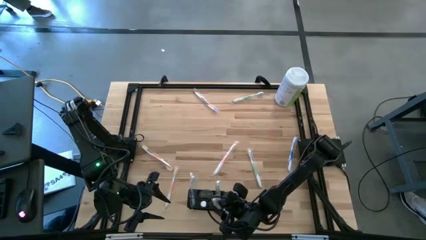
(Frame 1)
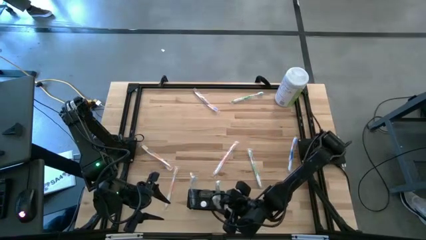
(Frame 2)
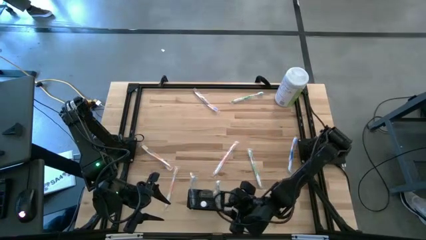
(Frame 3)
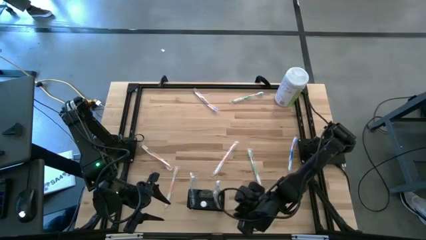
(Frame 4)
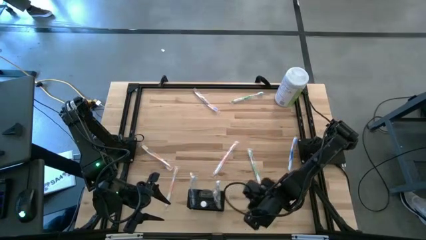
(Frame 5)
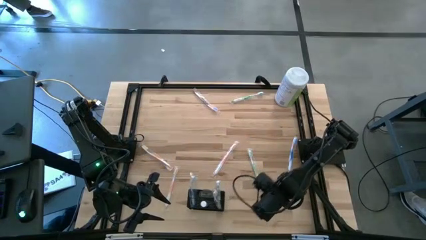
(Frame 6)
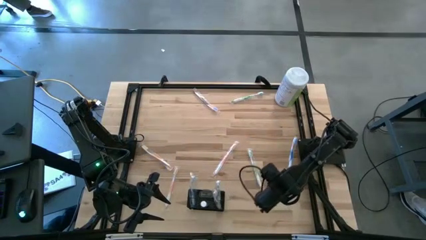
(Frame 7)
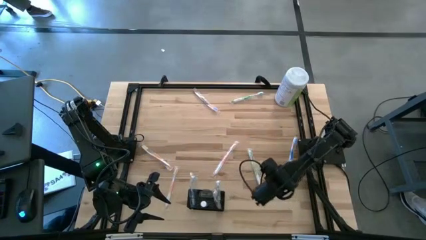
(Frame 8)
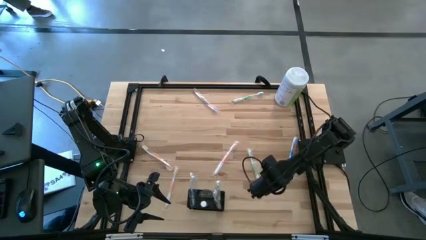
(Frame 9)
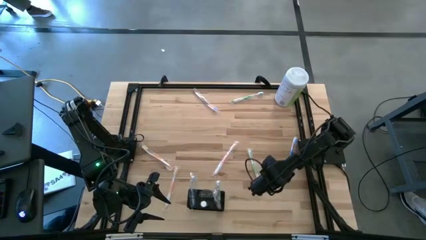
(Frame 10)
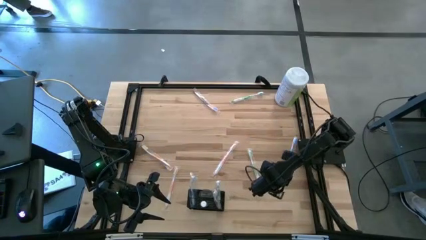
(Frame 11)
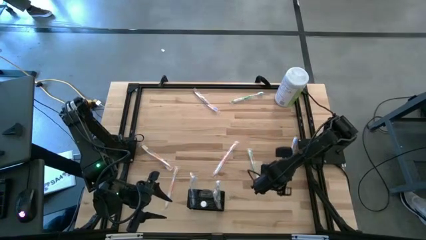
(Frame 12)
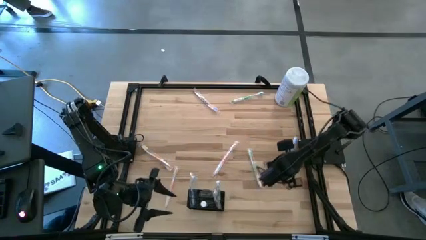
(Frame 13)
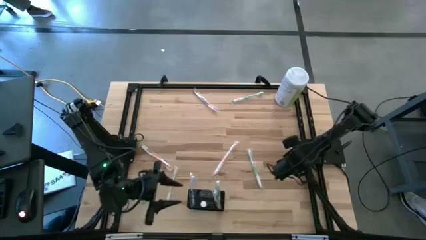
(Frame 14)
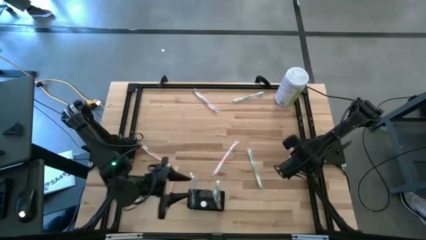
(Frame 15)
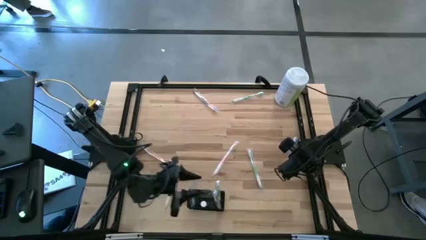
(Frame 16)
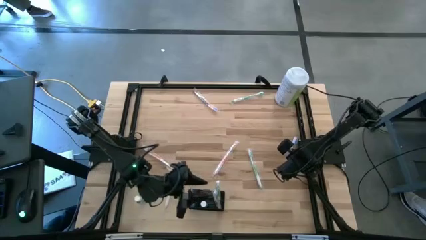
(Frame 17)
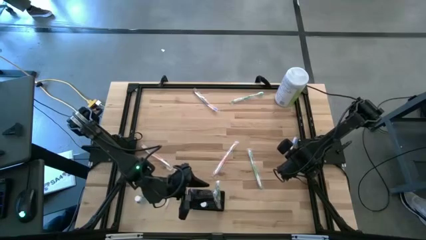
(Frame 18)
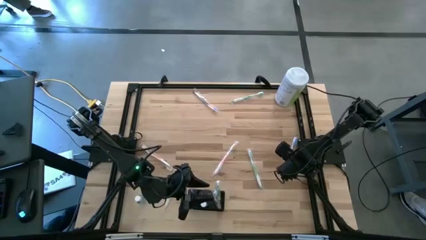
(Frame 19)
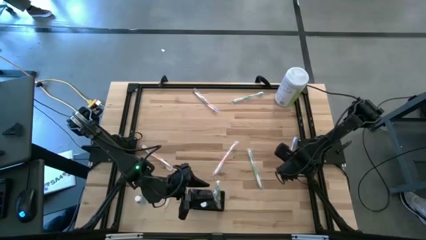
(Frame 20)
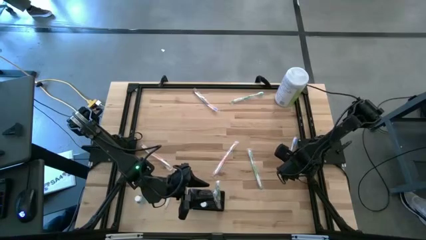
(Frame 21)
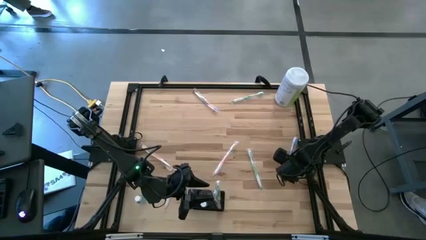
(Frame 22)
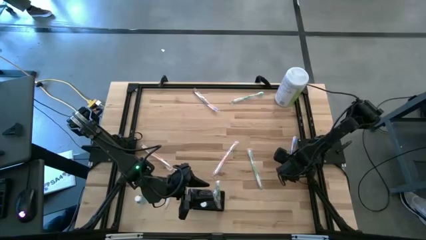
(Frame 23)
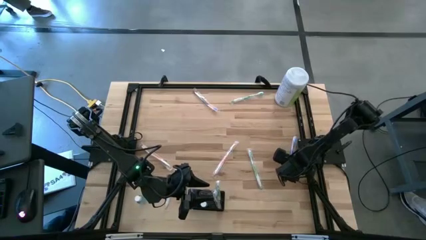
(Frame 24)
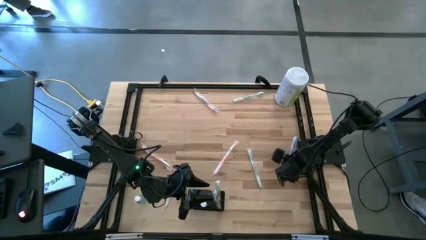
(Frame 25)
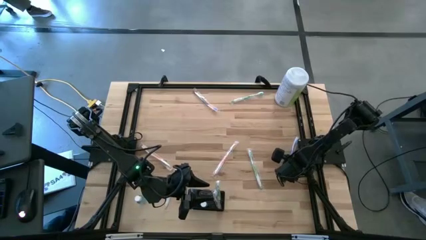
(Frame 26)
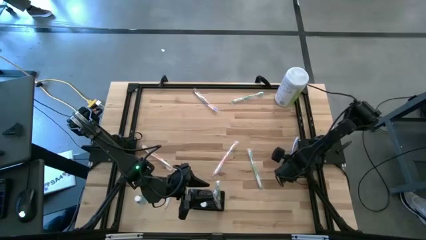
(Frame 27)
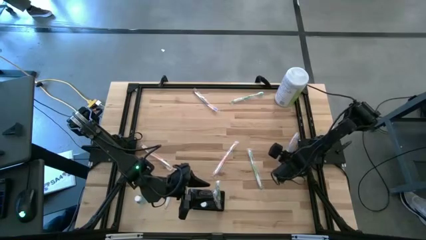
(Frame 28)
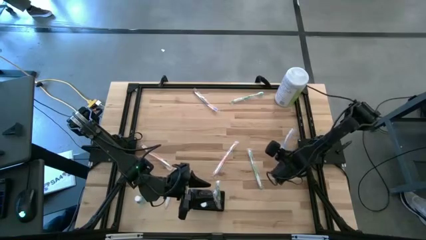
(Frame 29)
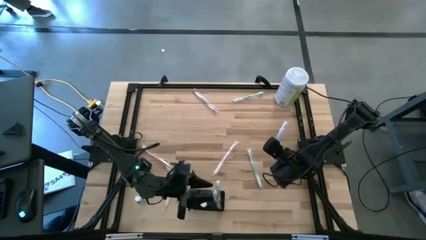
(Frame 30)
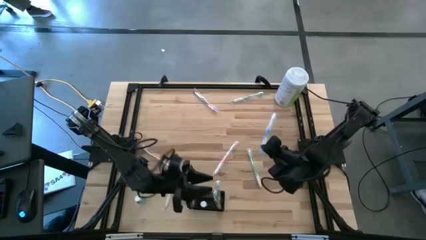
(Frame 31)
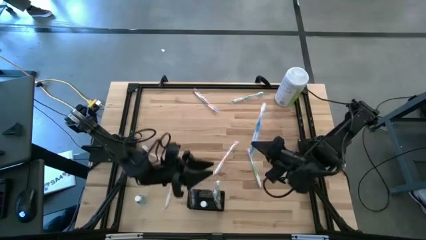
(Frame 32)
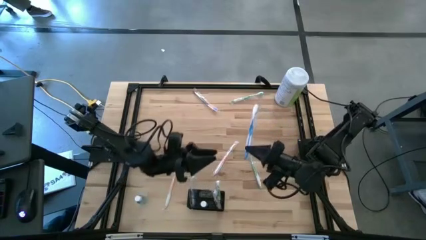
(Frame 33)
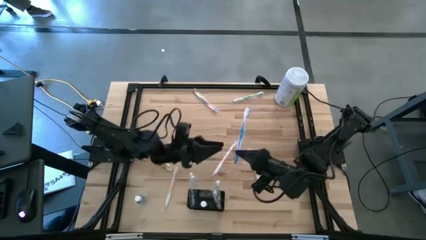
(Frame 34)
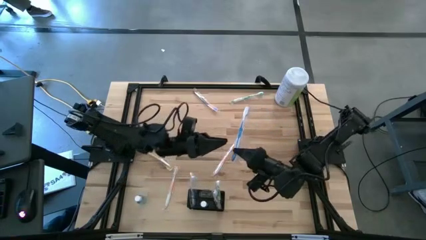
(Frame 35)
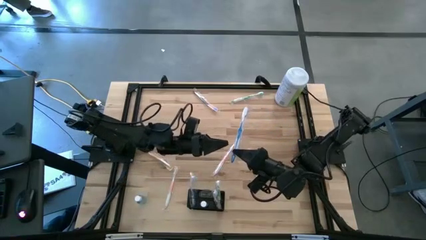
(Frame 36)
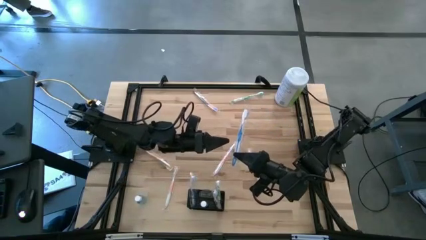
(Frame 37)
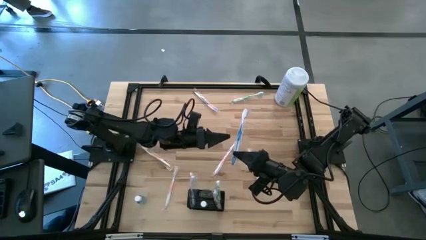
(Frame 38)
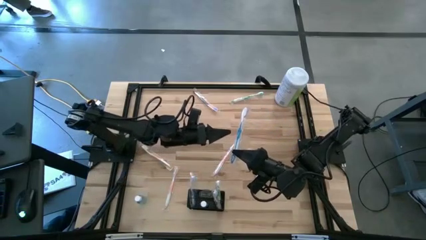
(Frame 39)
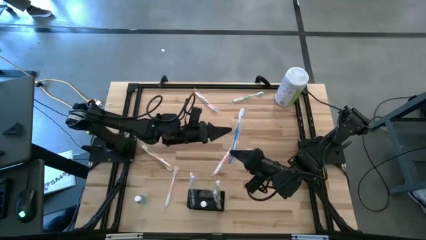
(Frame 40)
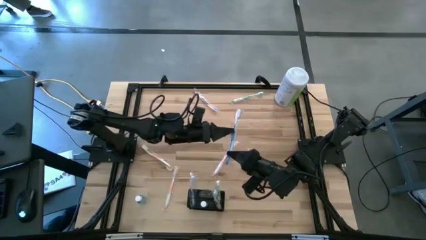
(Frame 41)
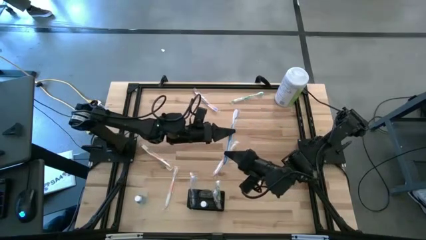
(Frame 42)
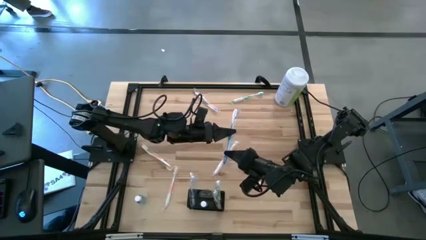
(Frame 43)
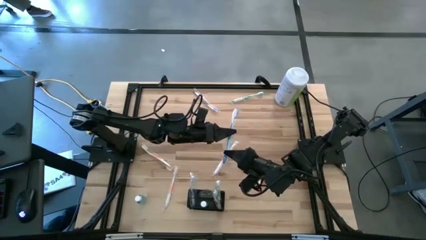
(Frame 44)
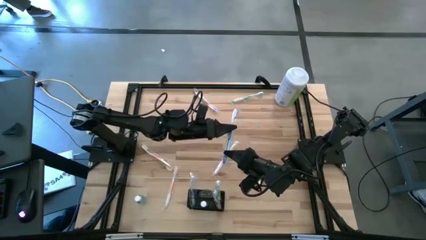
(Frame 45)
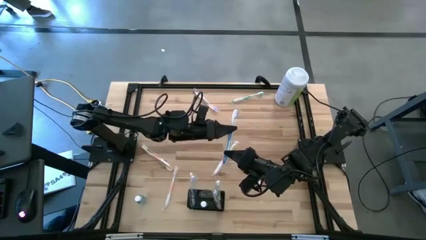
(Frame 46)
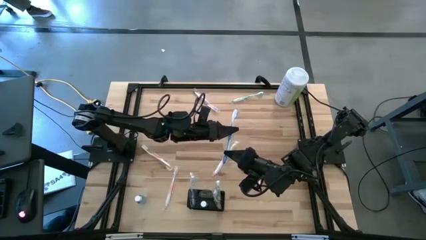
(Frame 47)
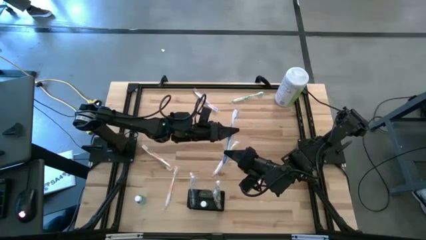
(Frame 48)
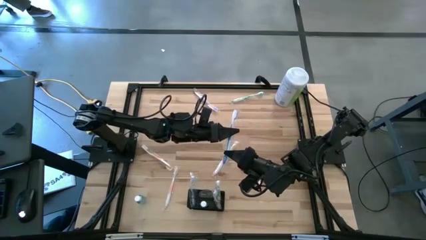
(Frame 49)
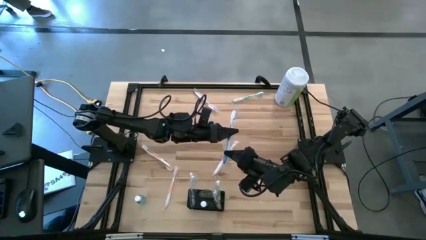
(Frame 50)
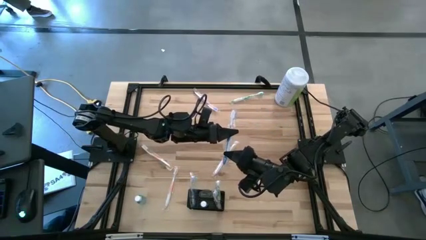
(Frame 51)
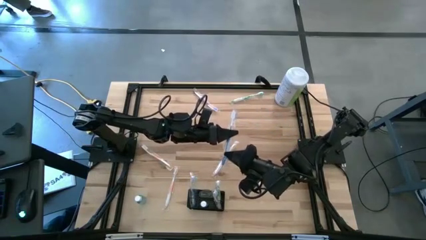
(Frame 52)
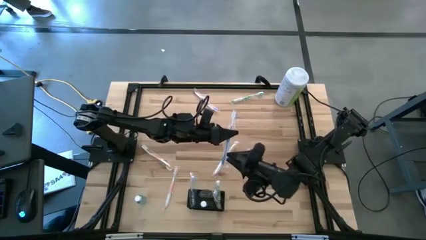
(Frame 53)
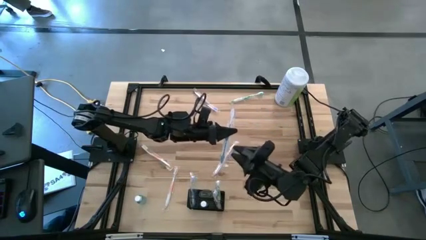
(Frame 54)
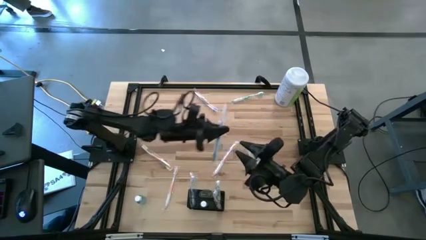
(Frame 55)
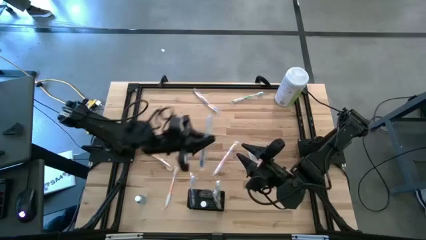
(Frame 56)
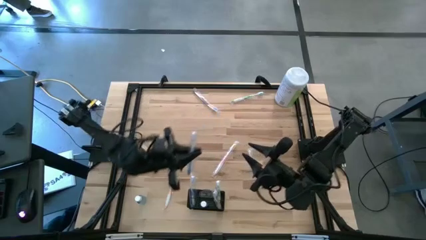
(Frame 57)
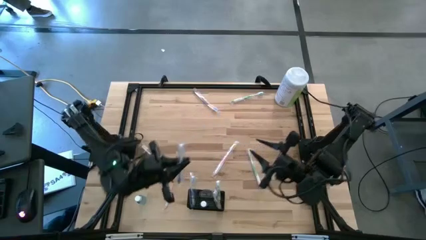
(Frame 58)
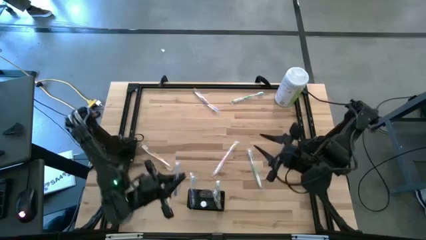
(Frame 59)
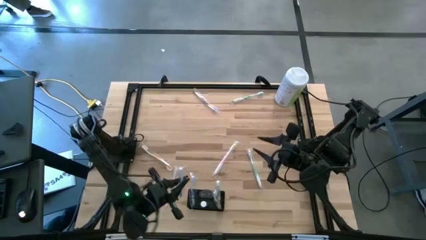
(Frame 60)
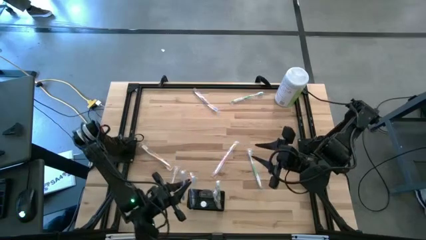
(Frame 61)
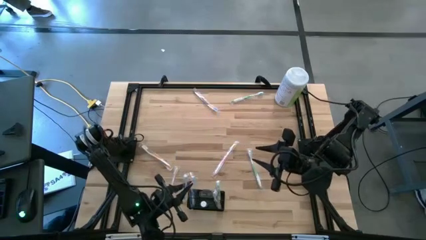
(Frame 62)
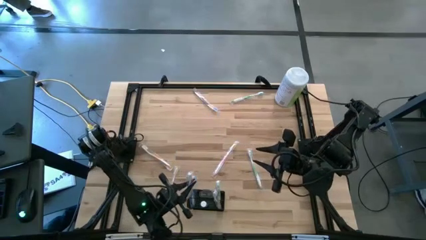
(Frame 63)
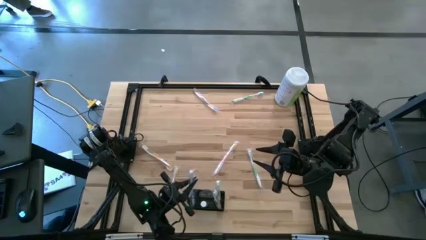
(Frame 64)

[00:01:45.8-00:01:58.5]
Task: Pick & Place toothbrushing station
Put the blue toothbrush into the black wire organizer

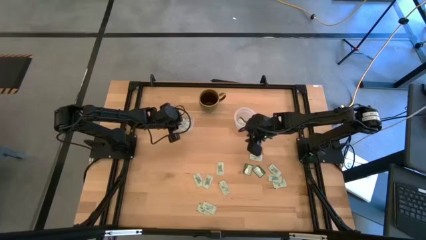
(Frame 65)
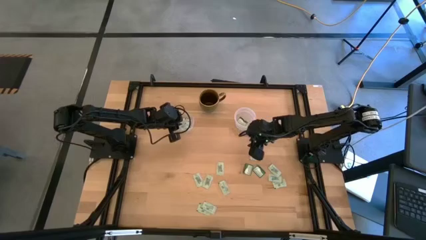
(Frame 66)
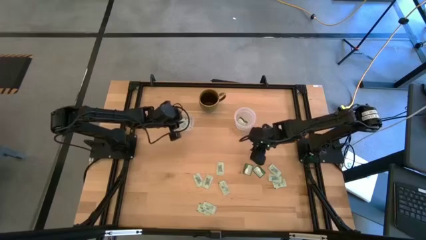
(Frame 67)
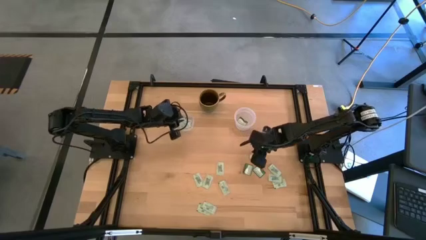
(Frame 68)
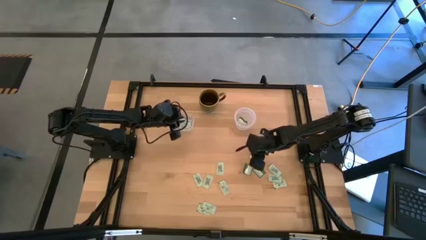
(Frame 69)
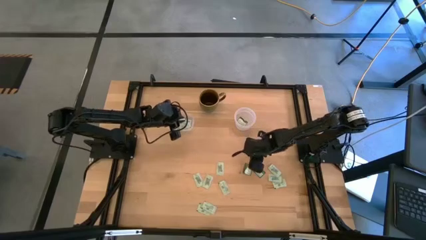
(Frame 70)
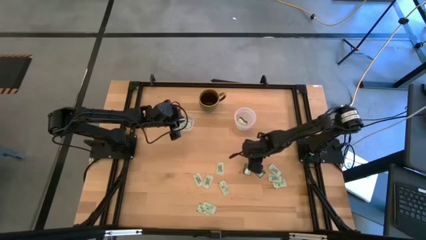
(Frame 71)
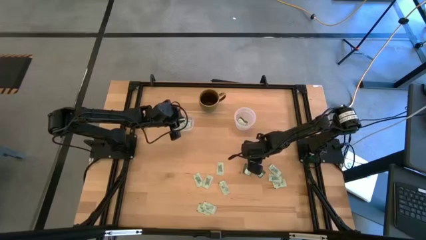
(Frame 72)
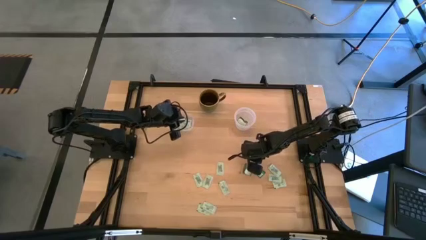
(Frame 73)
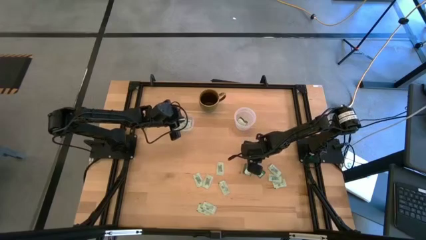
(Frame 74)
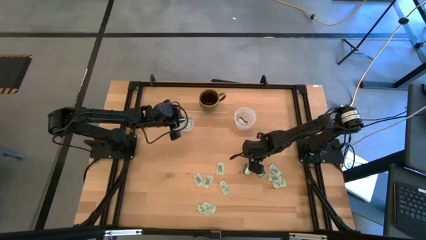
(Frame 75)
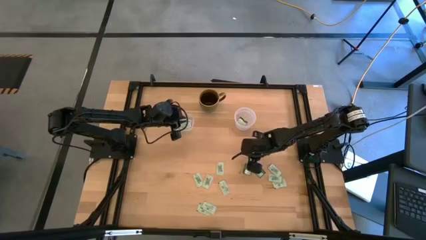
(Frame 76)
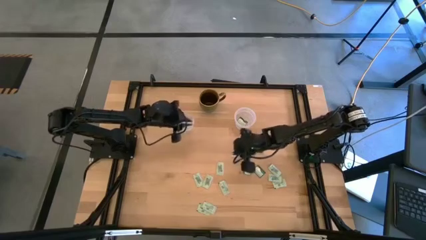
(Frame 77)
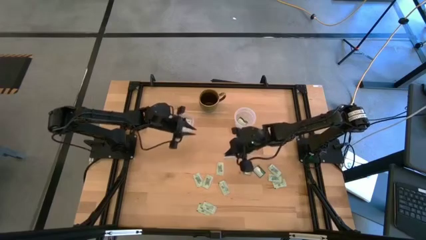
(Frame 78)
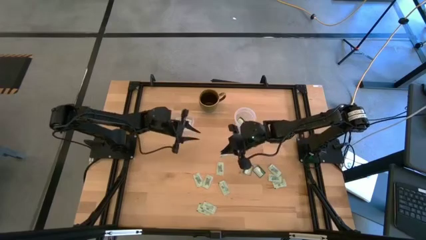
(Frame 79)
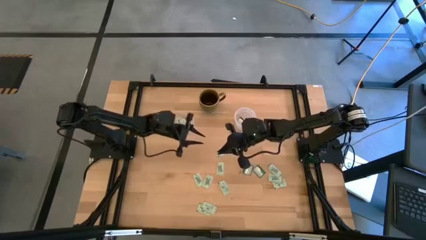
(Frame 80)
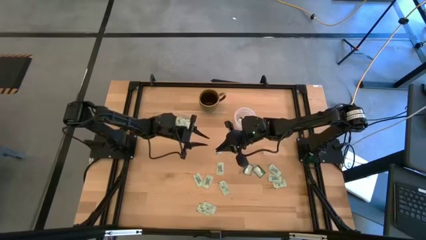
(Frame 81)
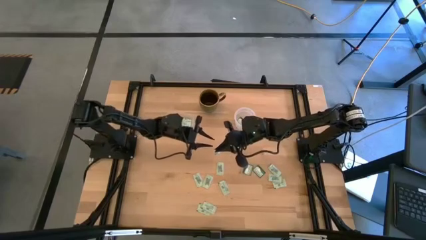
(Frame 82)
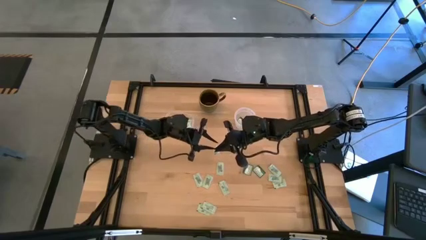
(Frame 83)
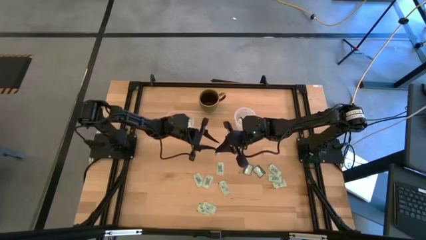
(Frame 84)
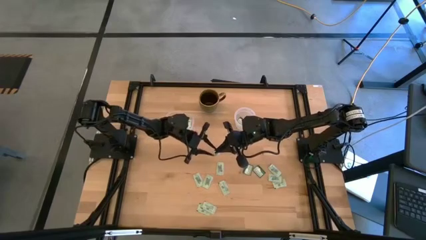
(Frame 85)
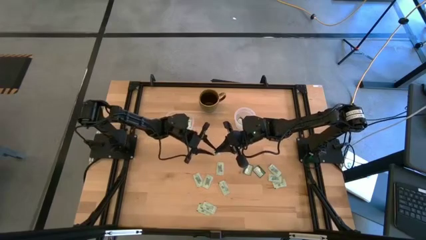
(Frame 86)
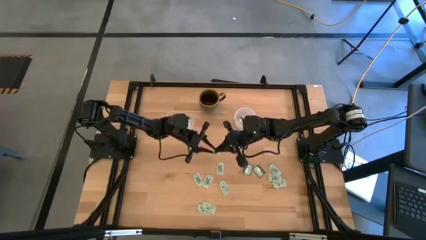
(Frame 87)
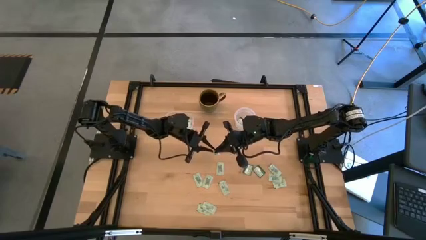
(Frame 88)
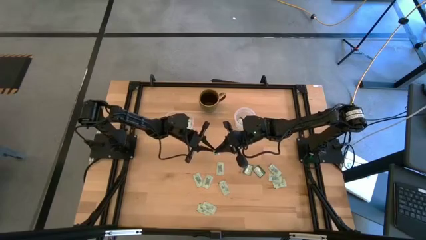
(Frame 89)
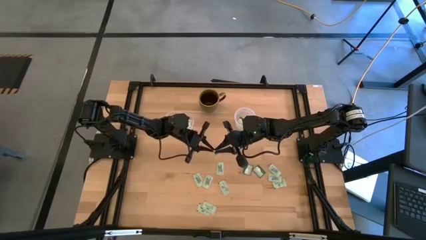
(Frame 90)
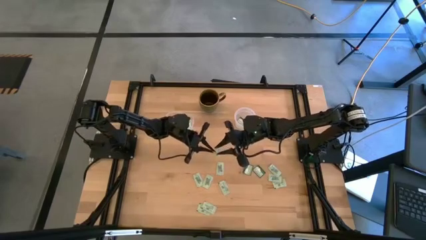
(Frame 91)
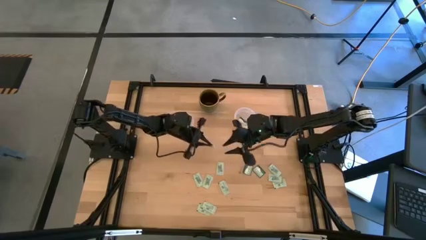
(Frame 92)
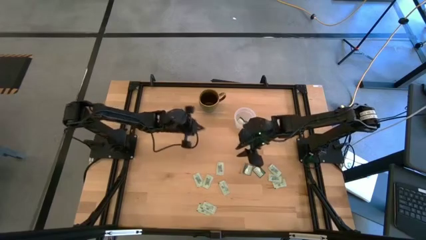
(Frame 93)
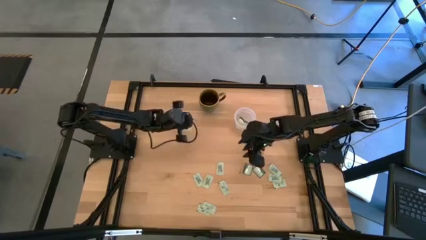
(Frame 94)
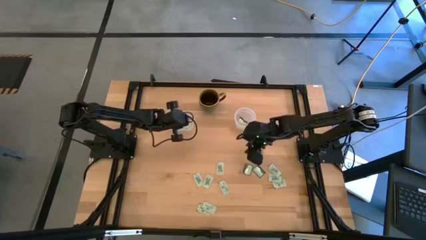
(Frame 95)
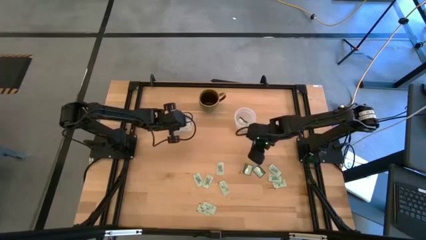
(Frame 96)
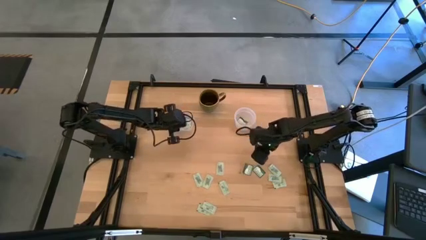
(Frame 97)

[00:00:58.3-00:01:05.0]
Task: Pick and place Stevia / Truvia into bins
Put the light green stevia packet into the left transparent container
